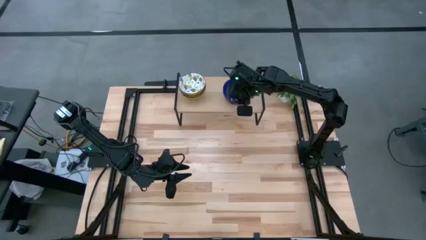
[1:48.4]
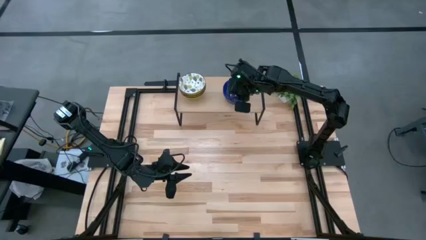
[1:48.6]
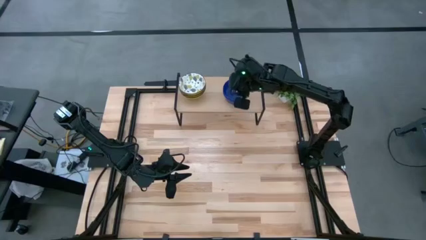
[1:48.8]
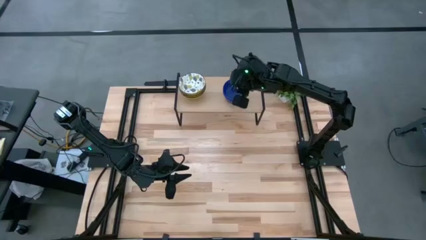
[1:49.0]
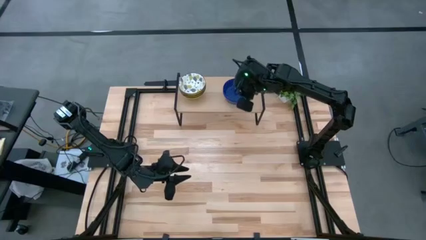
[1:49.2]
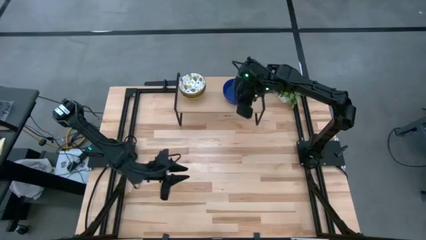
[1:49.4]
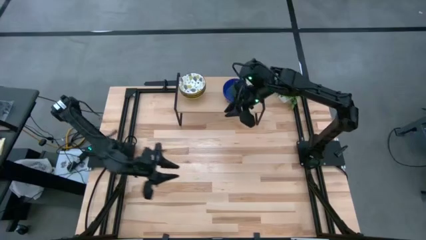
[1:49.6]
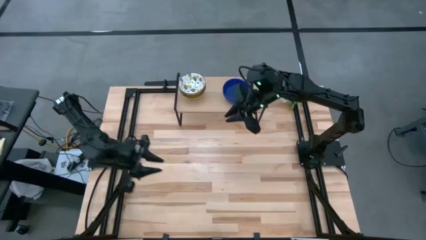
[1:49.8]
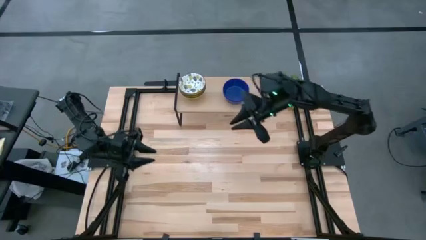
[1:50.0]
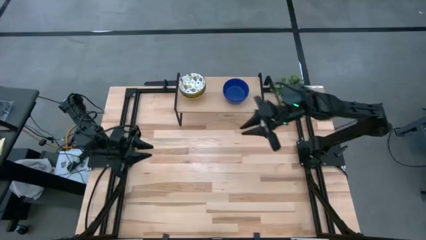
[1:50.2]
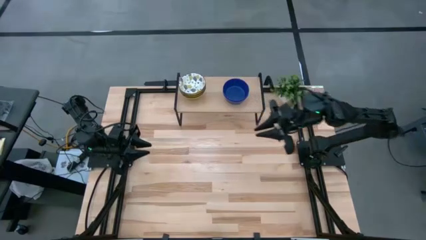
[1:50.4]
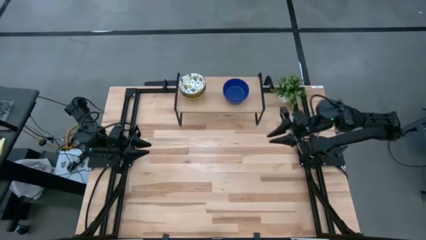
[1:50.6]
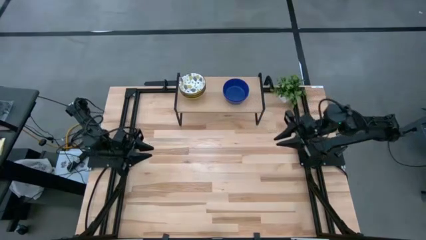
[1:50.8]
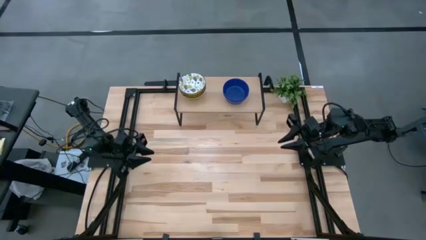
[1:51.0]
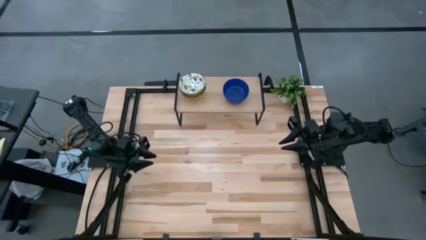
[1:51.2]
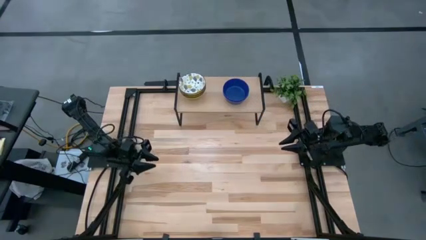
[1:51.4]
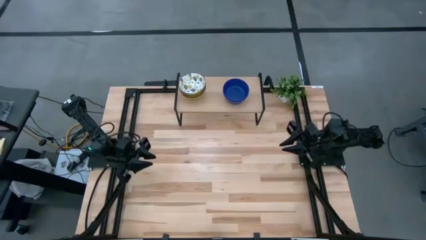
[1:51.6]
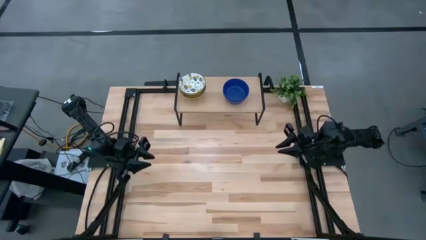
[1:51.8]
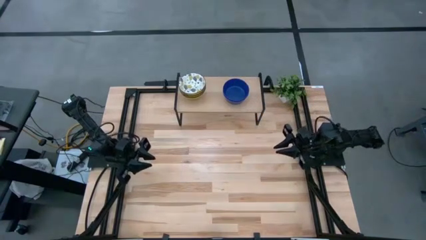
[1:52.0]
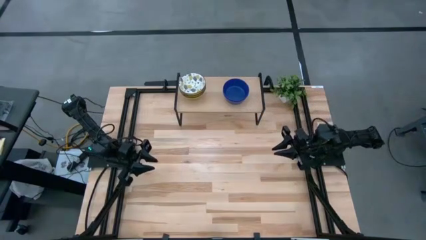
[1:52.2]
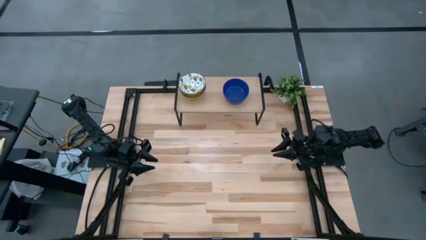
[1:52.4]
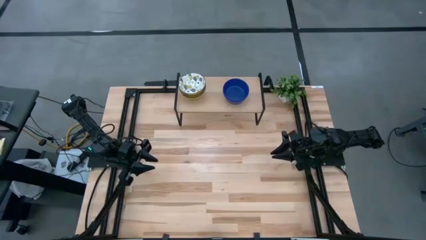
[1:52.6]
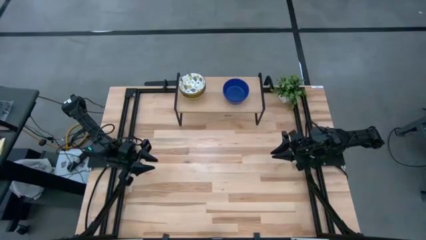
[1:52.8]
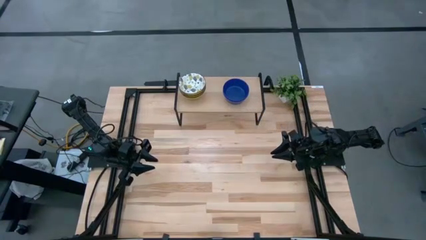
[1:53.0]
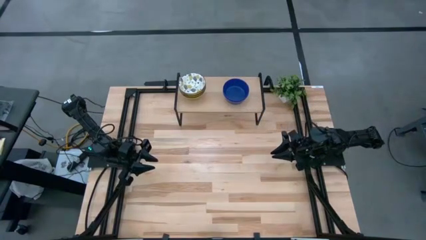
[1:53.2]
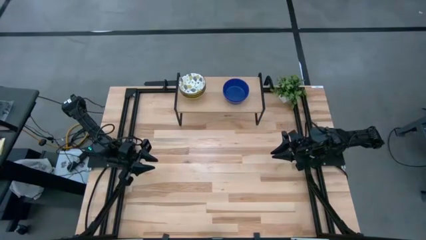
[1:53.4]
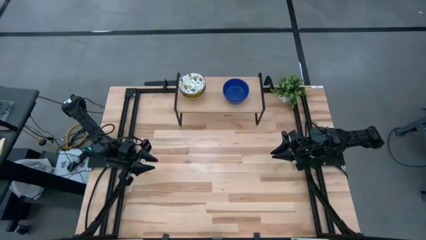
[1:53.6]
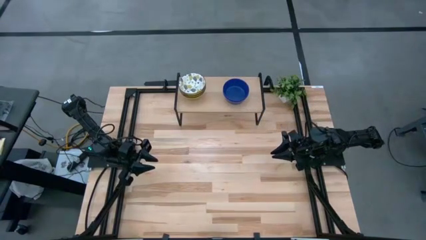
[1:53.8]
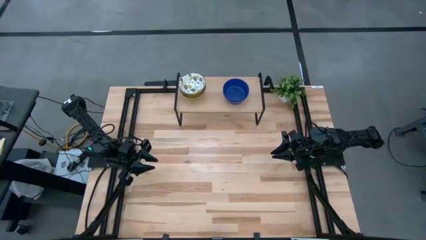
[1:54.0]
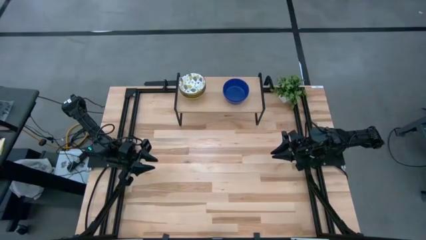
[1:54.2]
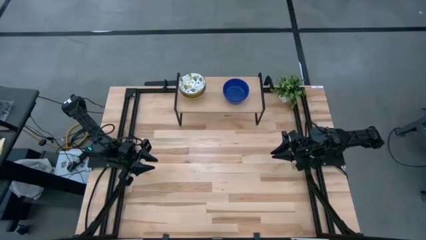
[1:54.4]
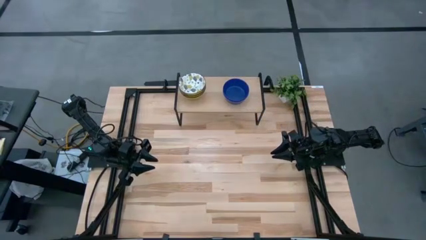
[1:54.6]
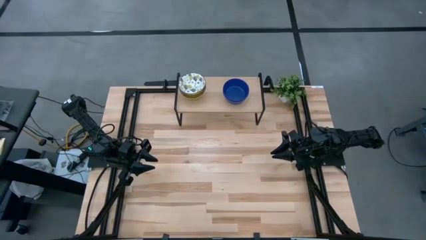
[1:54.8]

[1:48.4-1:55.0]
Task: Pick & Place Mini bowls
Return to Home Position

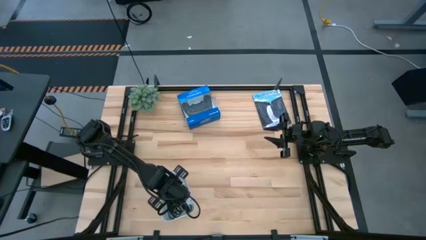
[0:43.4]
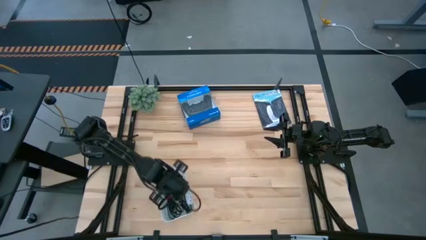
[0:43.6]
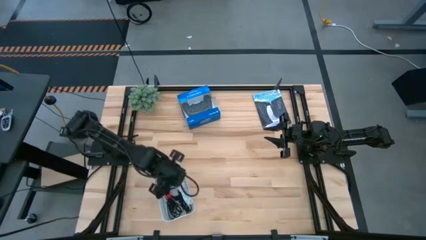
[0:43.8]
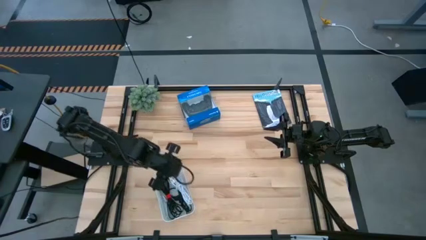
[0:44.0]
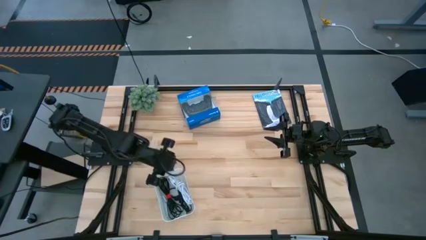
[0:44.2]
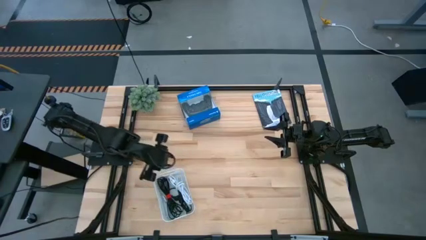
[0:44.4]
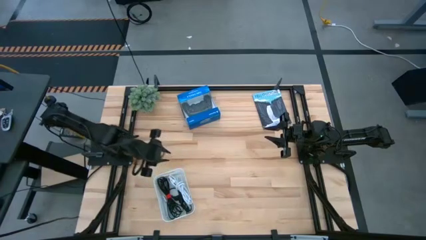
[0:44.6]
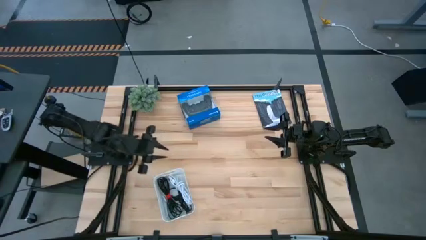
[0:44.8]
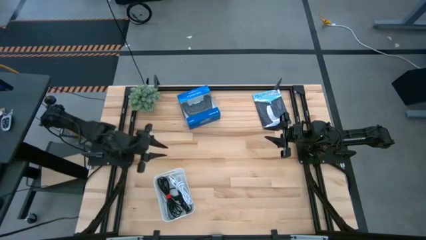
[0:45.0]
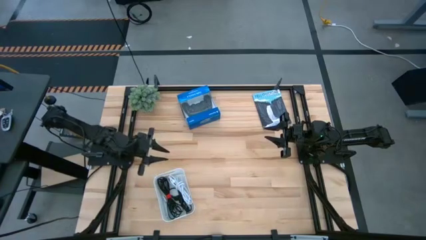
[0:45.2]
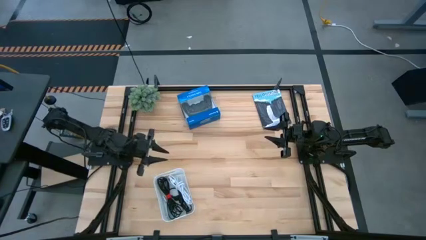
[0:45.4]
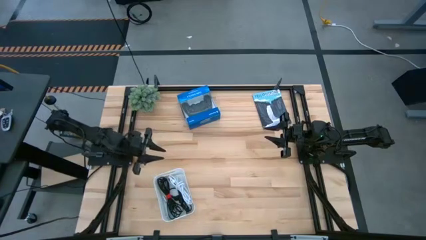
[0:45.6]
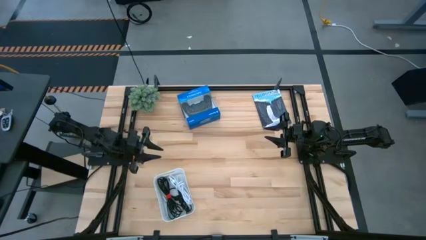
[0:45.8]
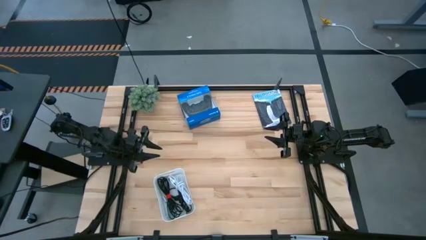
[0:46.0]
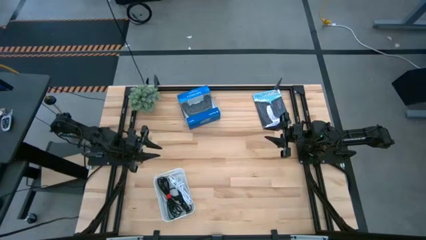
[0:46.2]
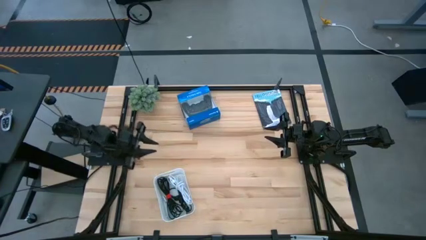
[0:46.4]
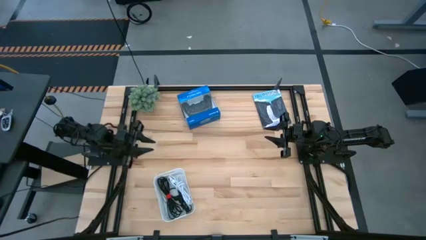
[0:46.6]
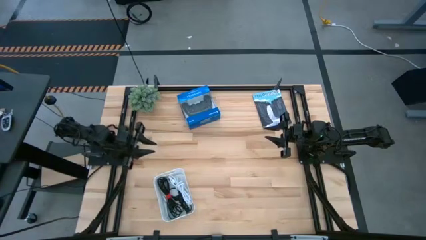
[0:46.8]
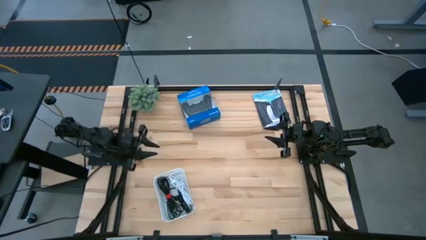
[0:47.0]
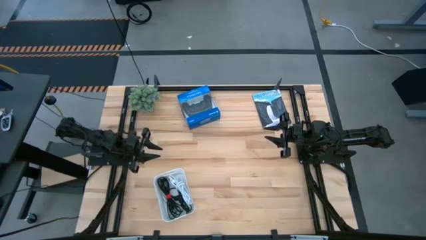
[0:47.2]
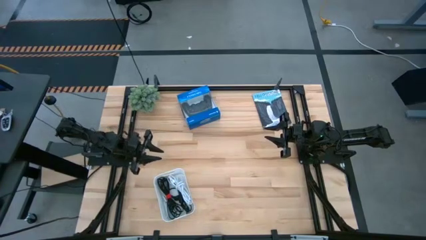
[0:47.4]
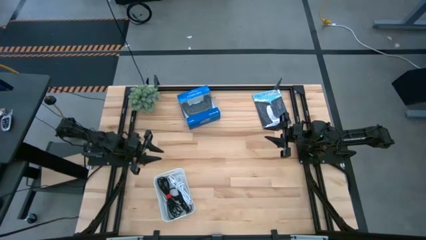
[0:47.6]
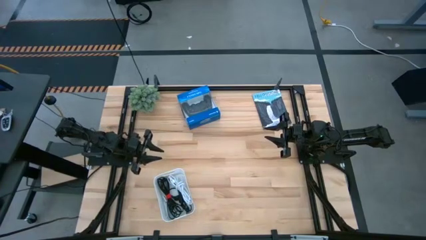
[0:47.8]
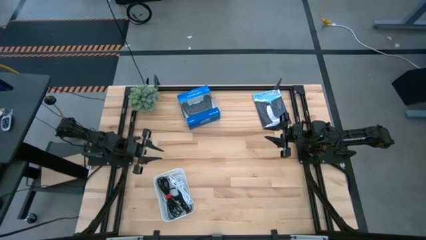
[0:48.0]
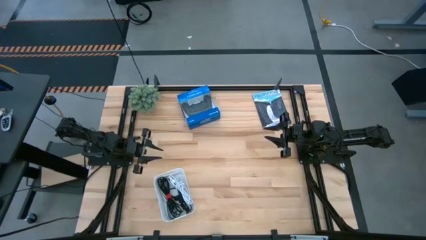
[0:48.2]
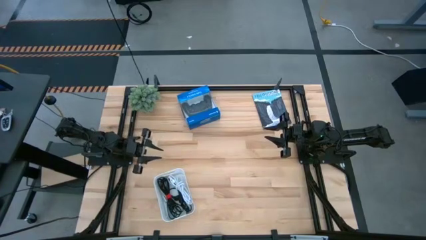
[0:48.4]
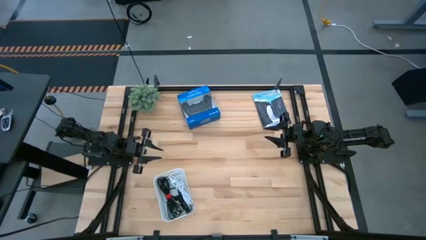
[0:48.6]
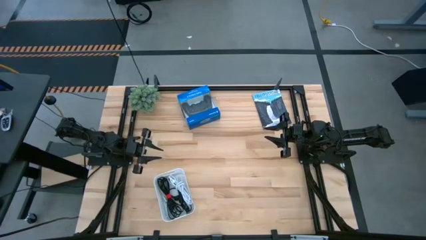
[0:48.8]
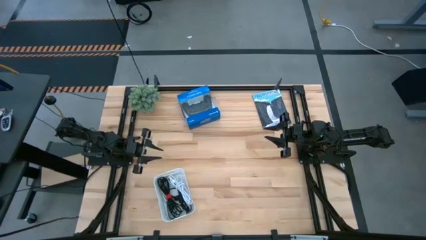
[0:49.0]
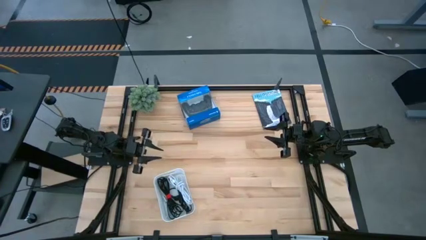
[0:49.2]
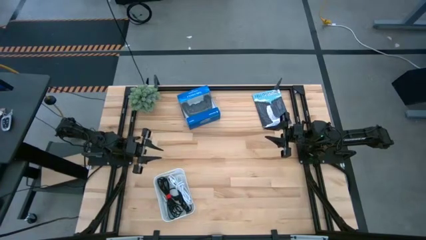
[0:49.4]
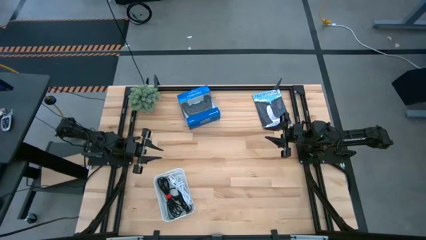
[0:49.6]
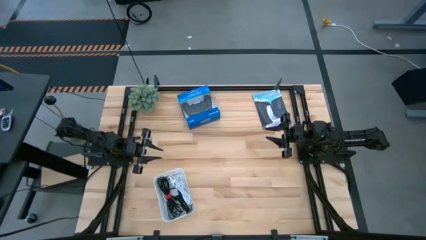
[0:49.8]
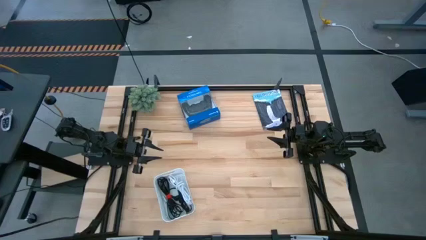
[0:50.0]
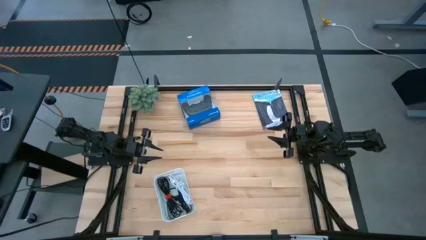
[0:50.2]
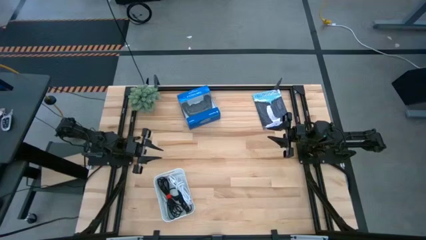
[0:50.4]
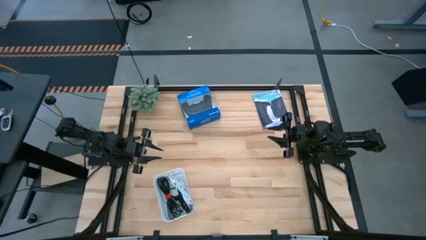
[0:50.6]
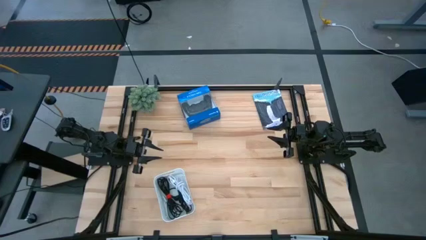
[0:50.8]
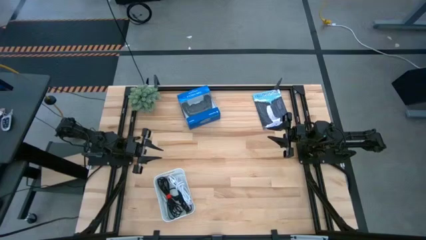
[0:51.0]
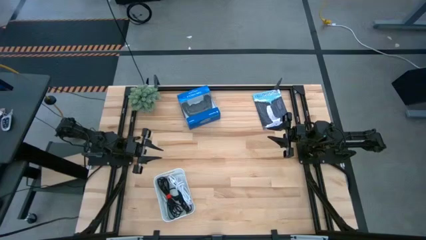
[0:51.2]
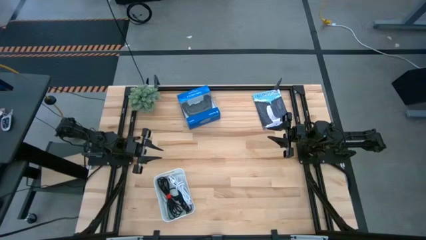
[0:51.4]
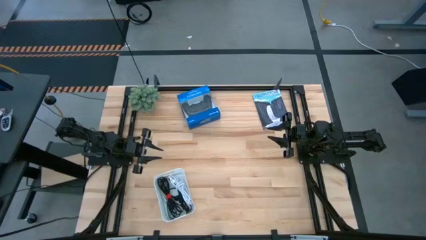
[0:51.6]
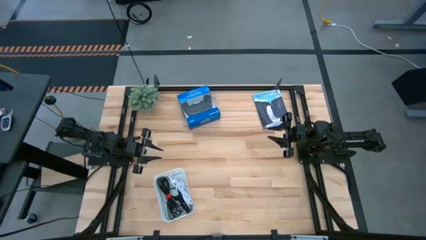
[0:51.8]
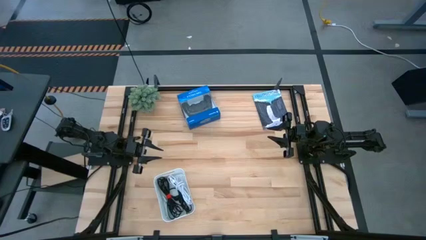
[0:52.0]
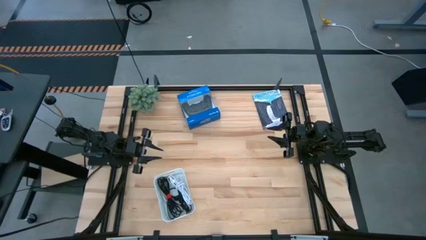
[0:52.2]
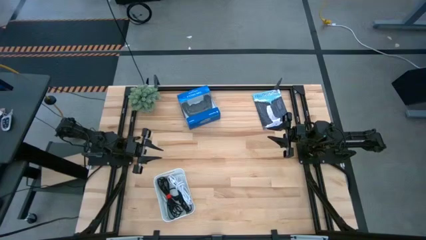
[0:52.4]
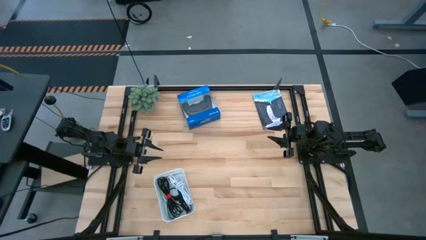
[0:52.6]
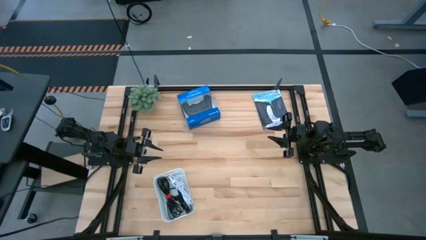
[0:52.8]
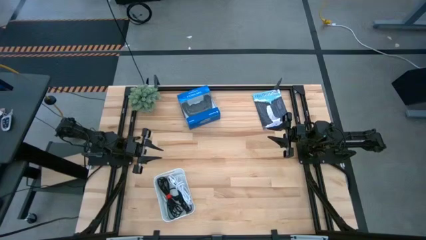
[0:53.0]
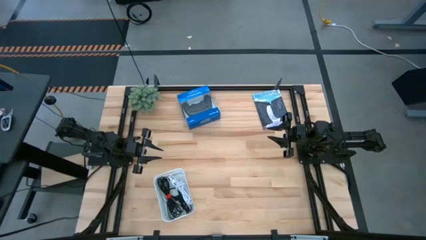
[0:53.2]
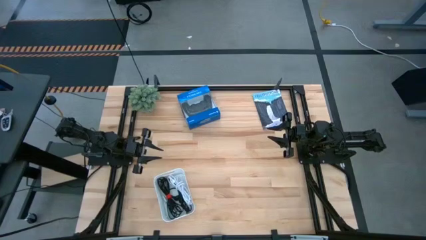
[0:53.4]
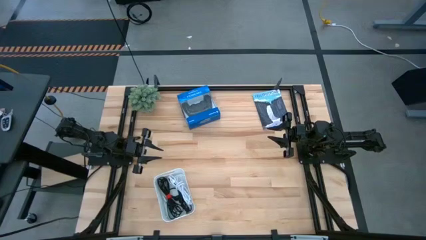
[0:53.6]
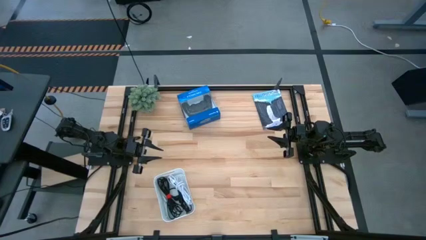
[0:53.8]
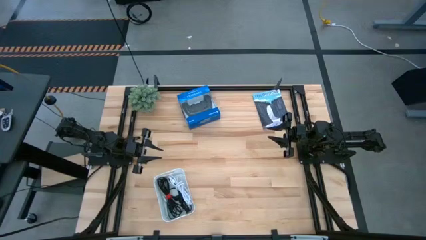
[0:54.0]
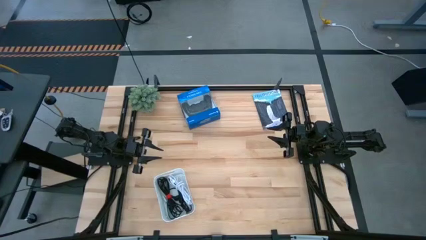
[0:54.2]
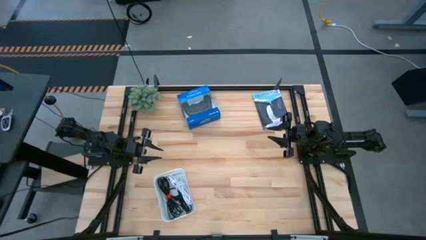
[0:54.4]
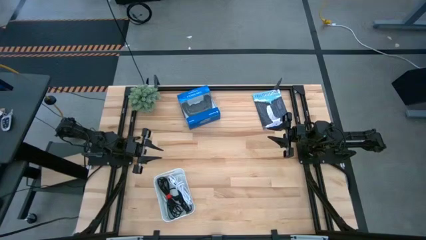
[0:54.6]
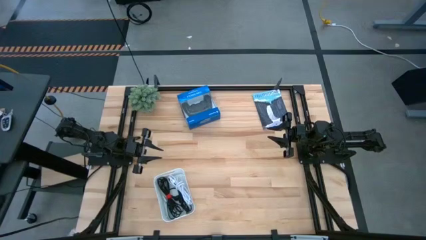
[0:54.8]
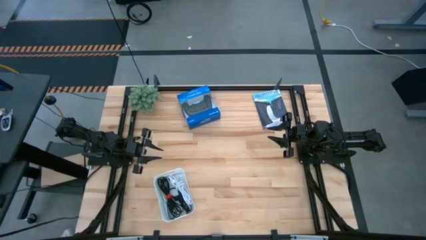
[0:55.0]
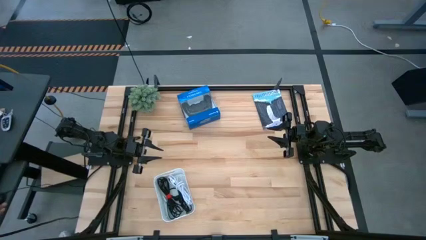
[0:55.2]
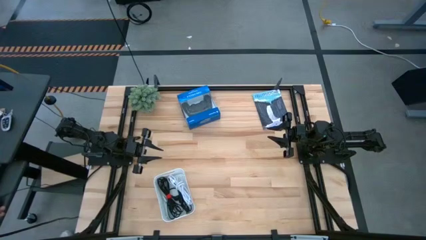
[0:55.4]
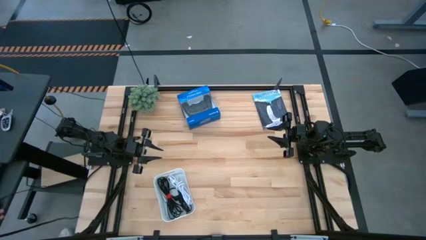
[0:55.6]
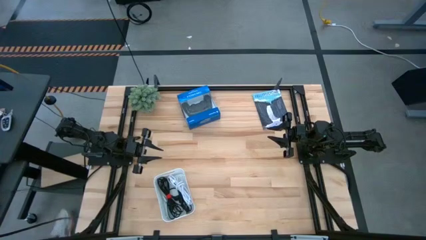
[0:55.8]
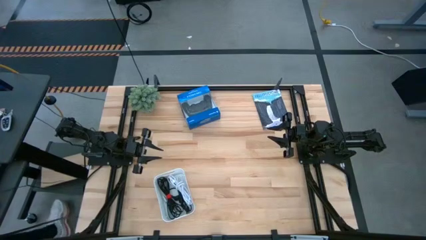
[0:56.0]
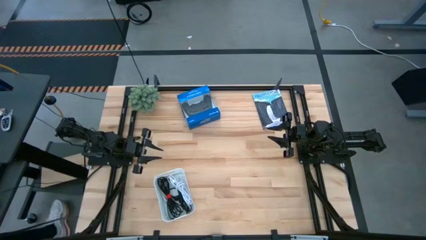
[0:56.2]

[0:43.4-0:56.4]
Task: Pick and place USB-C Cables
Return to Home Position
